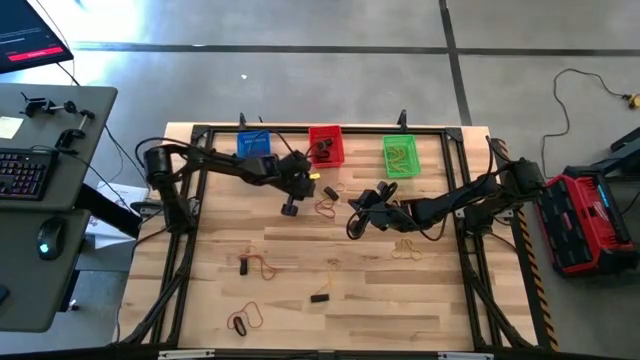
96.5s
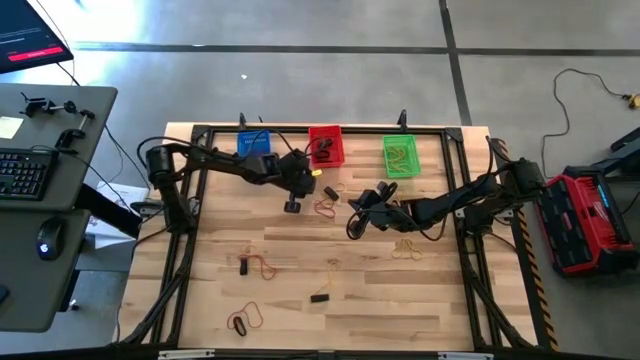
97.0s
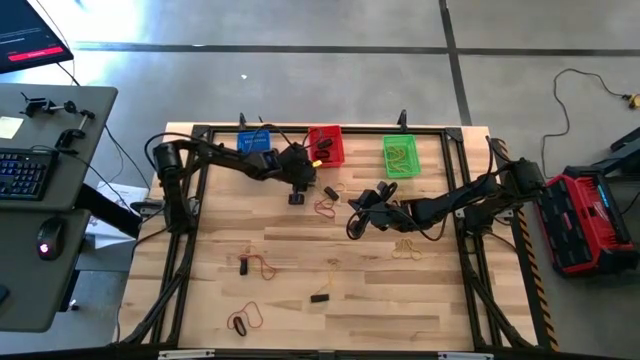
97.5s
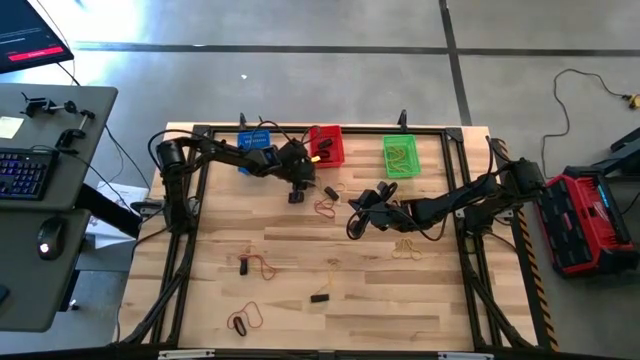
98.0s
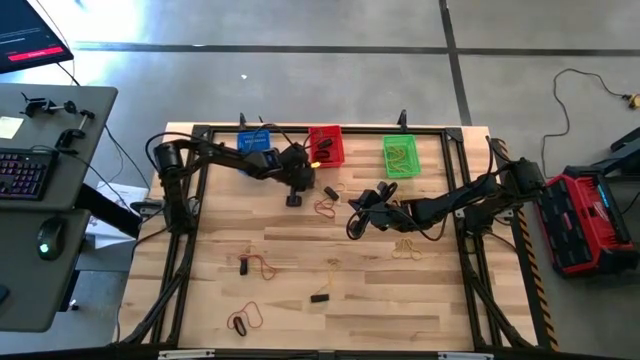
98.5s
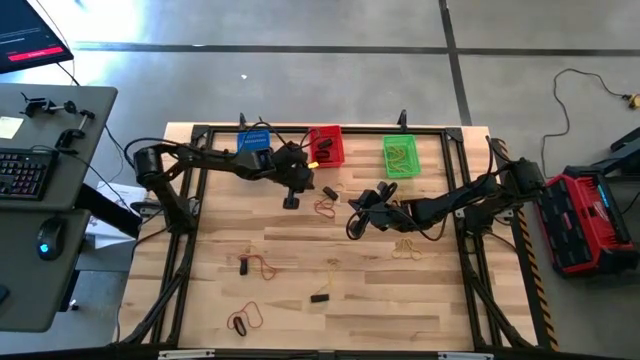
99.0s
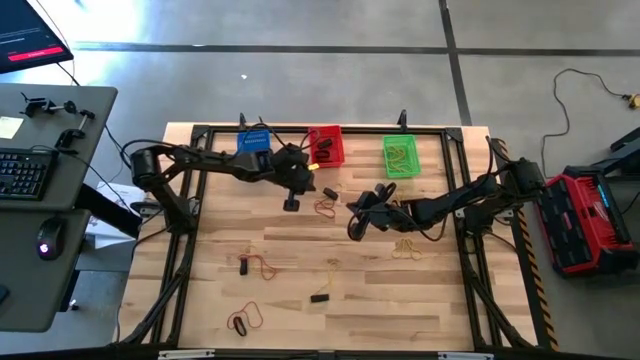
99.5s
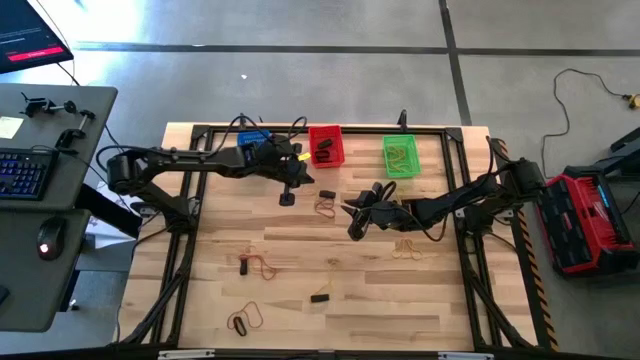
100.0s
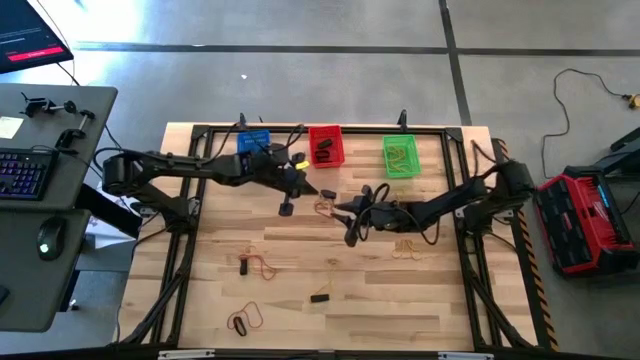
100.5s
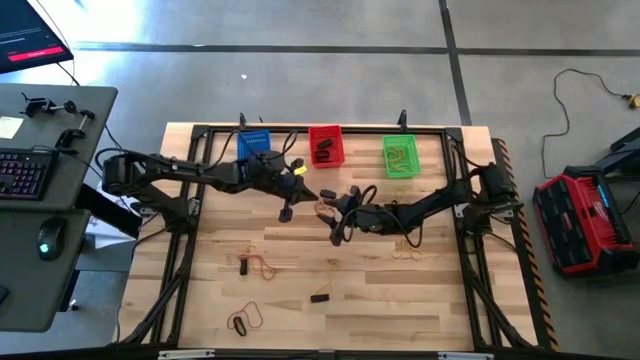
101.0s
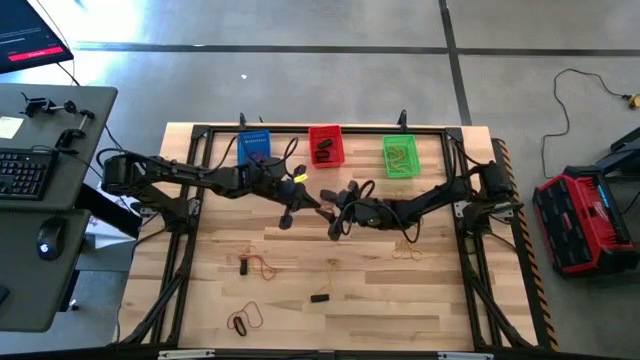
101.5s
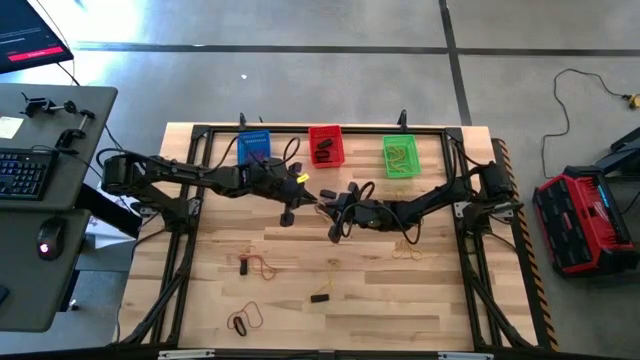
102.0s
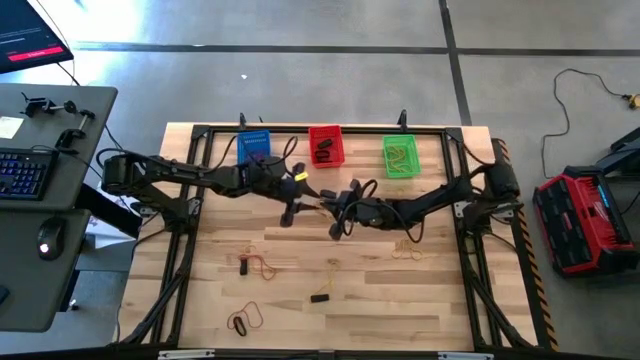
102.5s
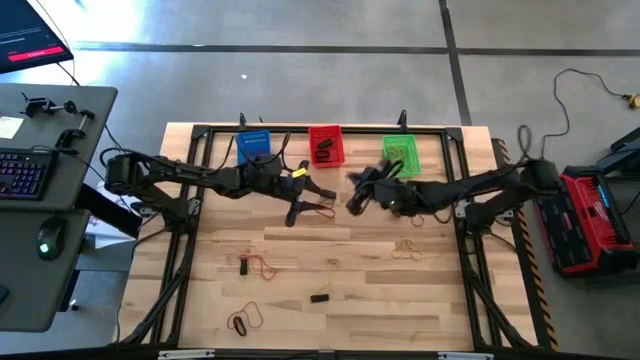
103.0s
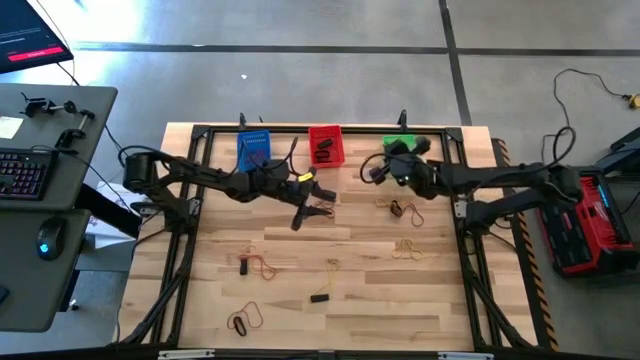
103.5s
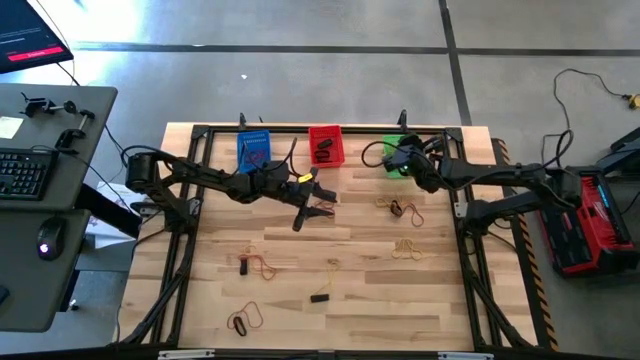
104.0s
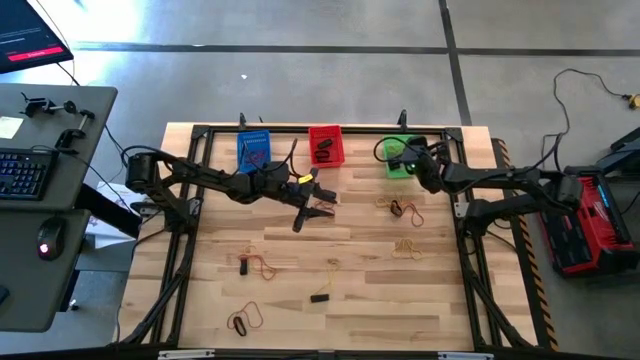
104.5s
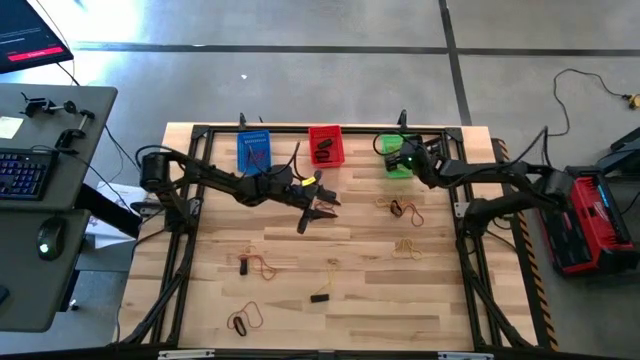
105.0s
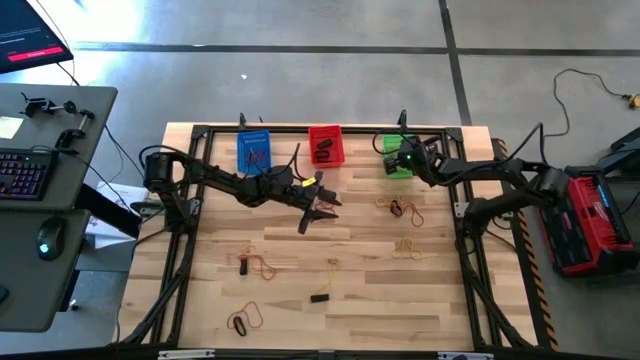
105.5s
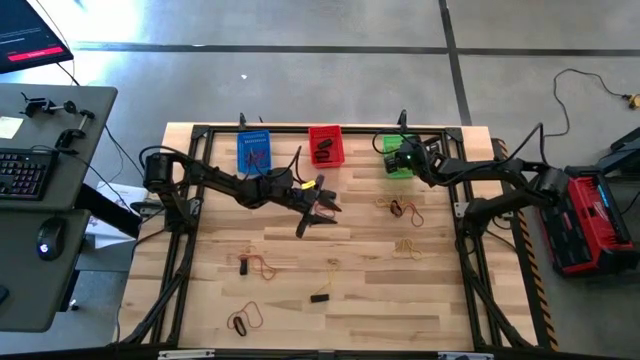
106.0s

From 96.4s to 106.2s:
Task: Sort rubber bands into baskets
Put the yellow rubber band into the green bin

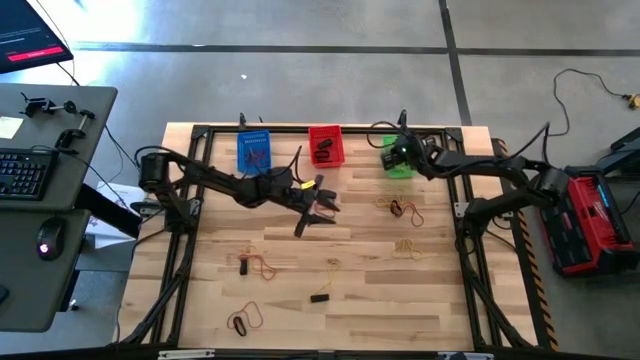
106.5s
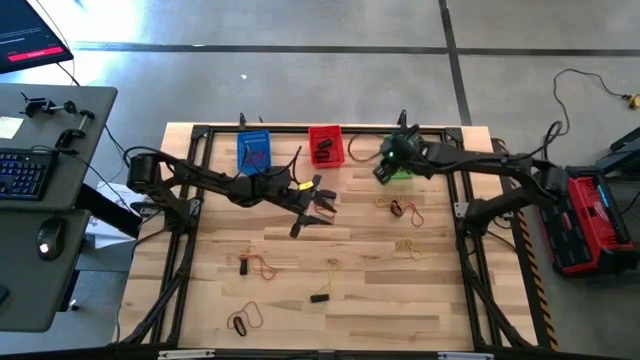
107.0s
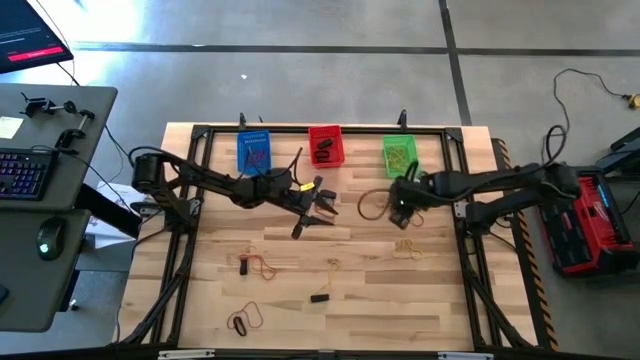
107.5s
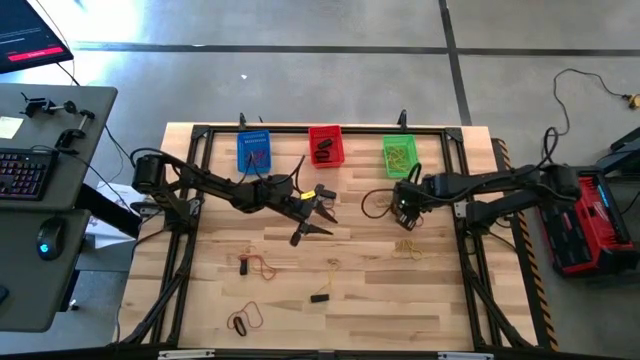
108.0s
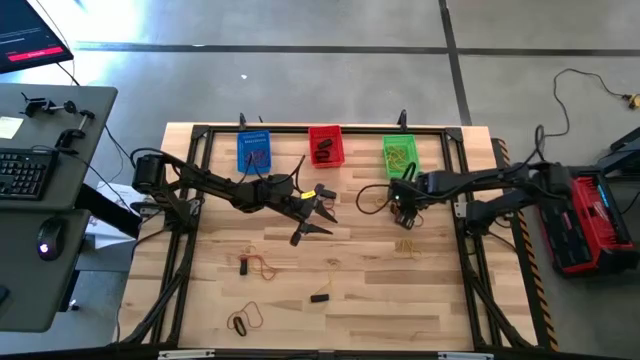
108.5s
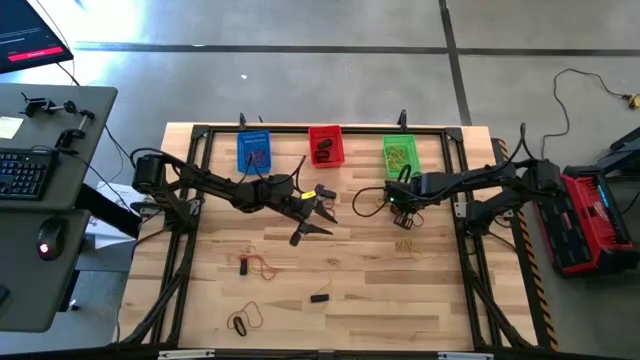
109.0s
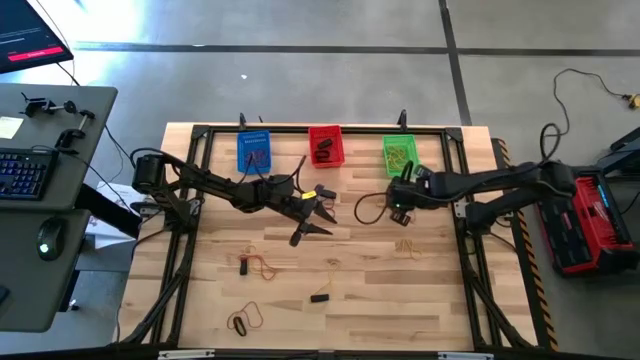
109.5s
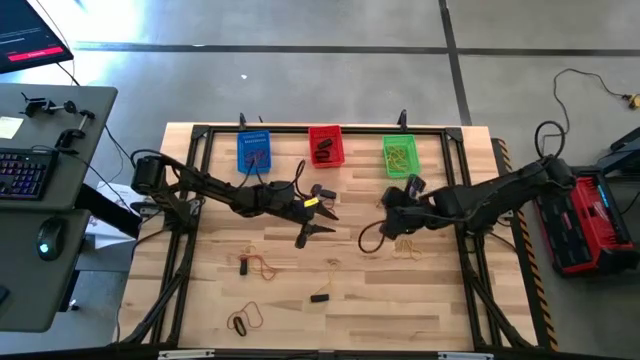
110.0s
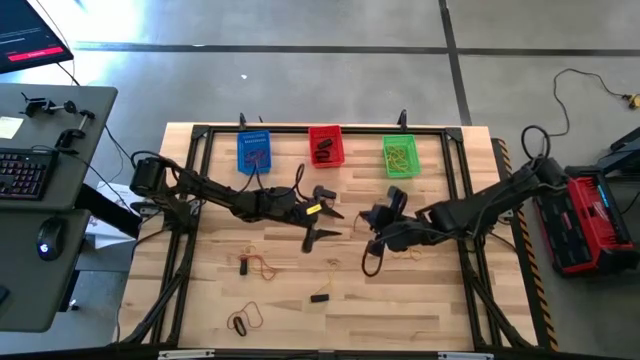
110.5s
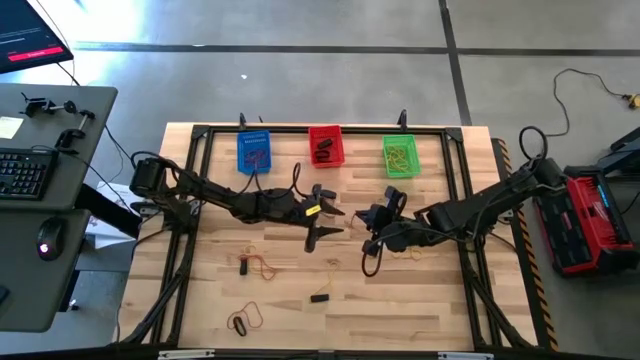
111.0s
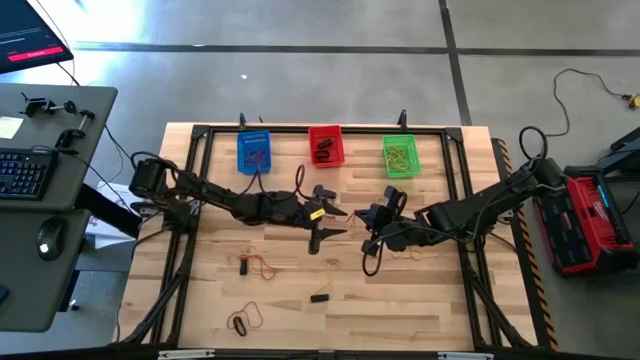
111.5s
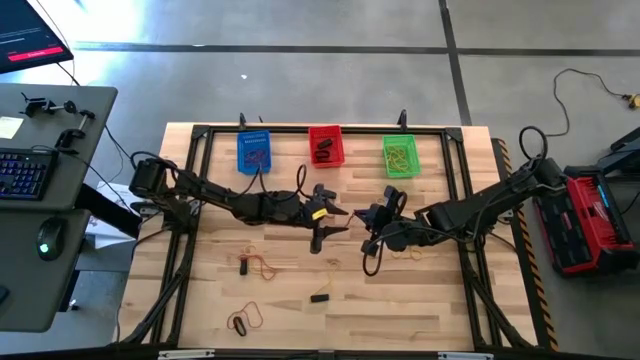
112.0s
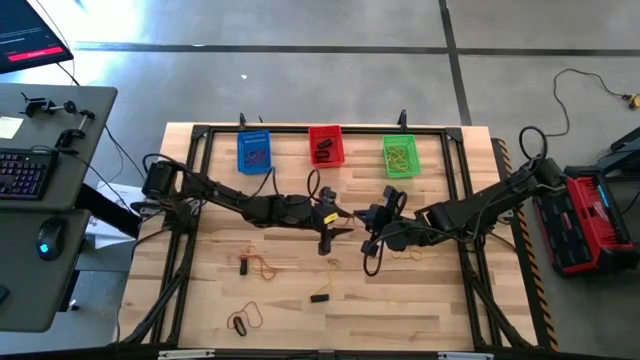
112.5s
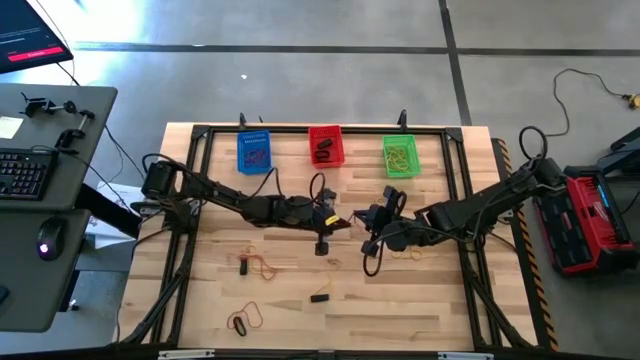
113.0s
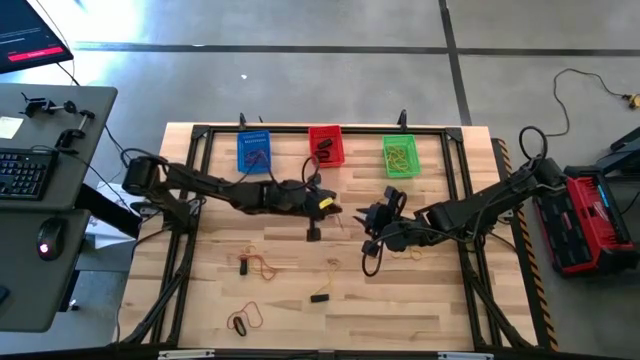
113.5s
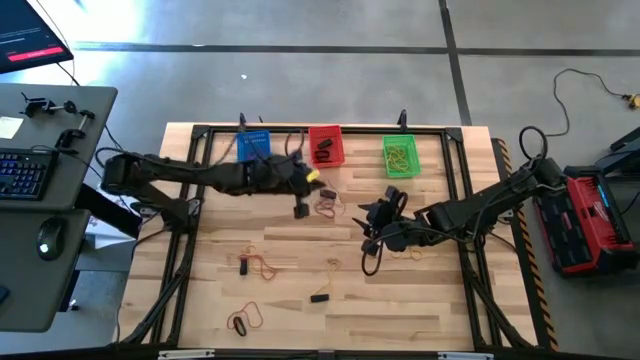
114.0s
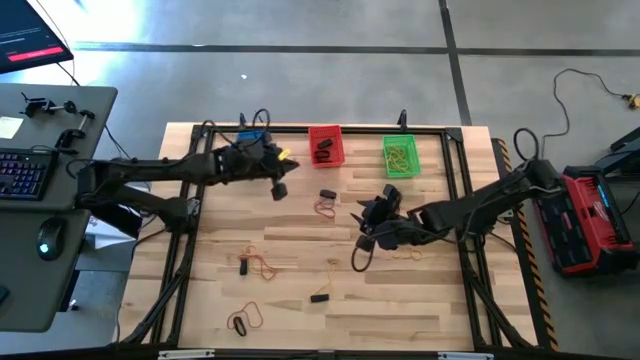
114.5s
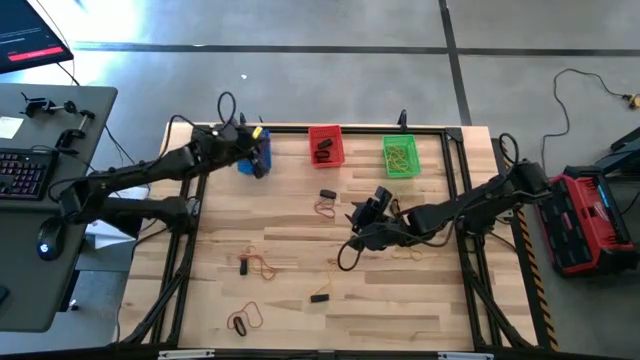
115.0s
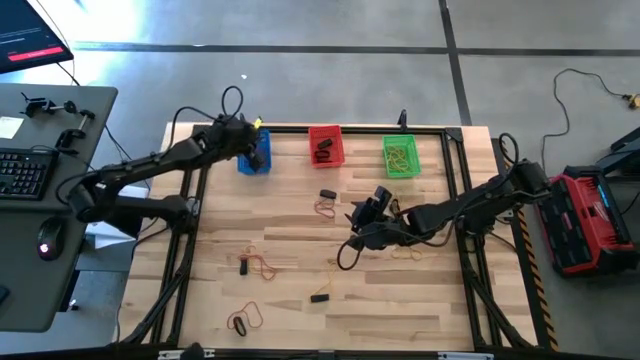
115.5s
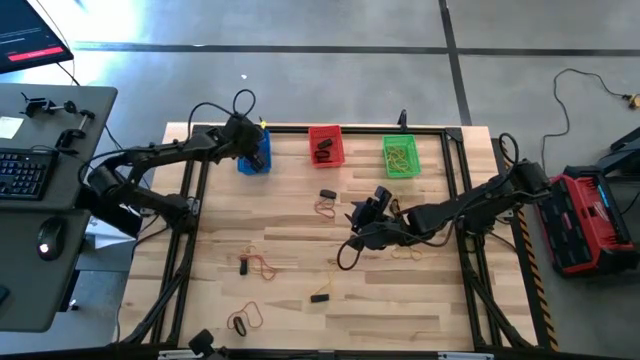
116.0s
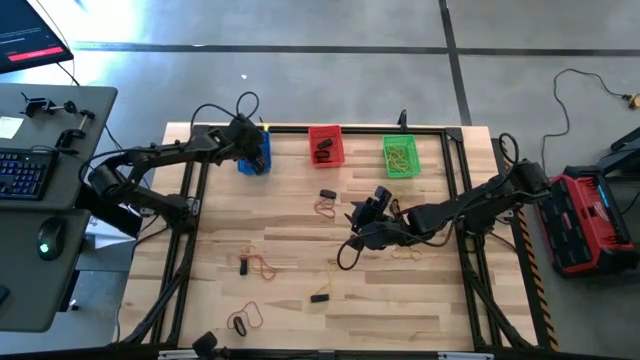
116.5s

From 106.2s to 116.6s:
Put the red rubber band into the blue bin
